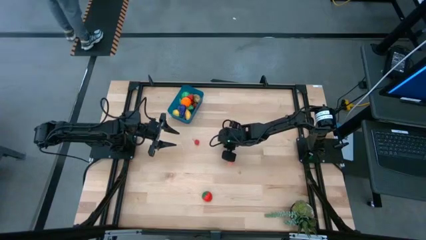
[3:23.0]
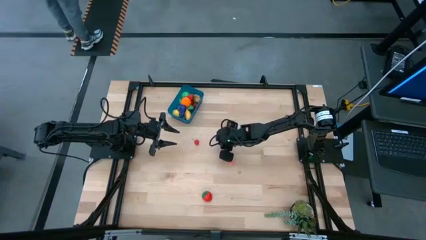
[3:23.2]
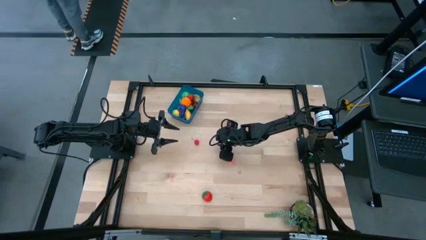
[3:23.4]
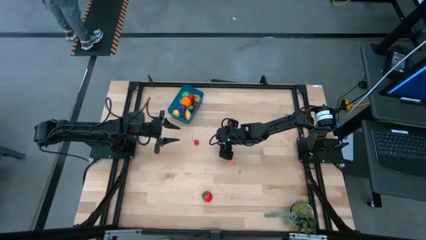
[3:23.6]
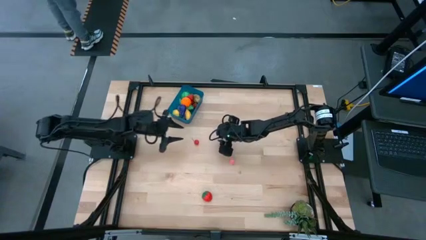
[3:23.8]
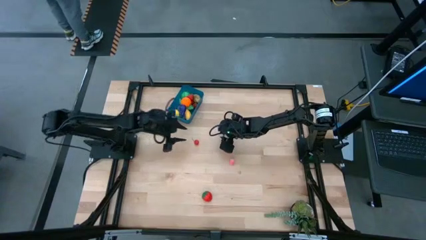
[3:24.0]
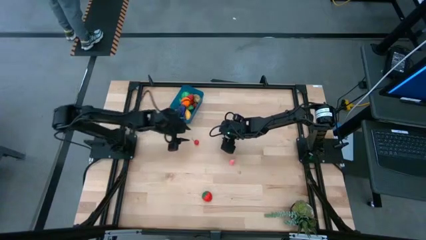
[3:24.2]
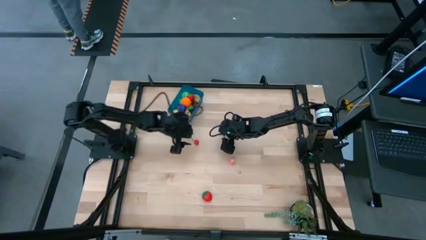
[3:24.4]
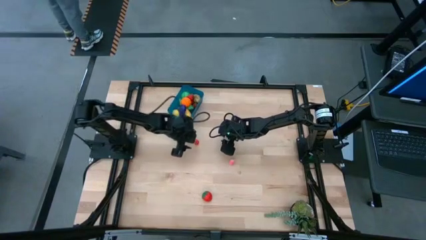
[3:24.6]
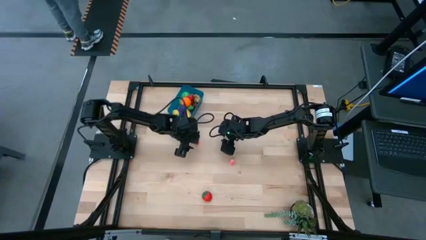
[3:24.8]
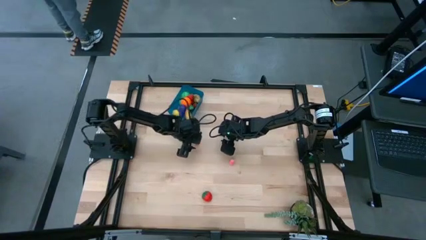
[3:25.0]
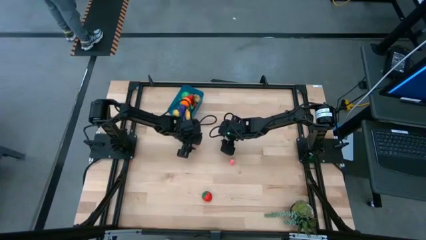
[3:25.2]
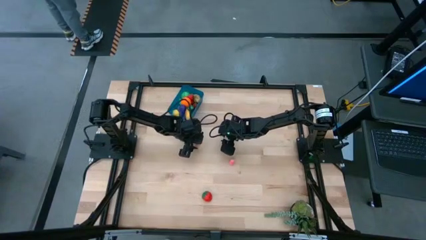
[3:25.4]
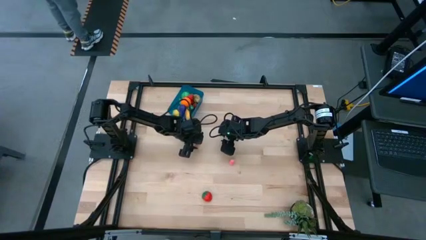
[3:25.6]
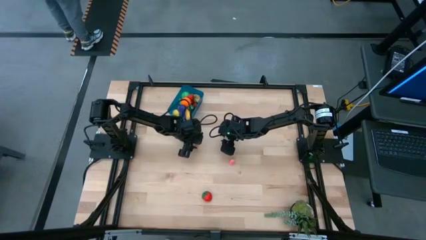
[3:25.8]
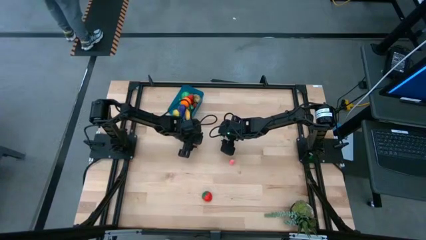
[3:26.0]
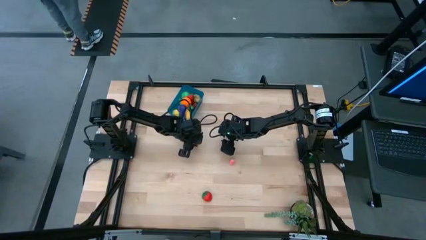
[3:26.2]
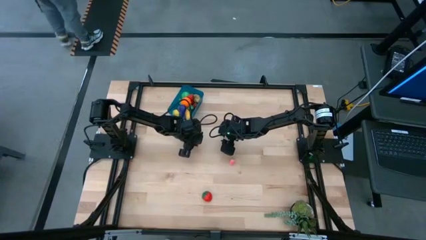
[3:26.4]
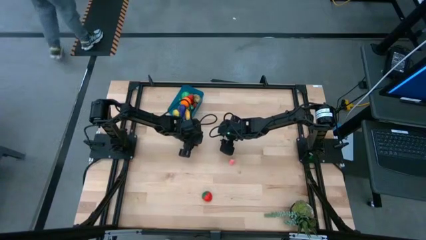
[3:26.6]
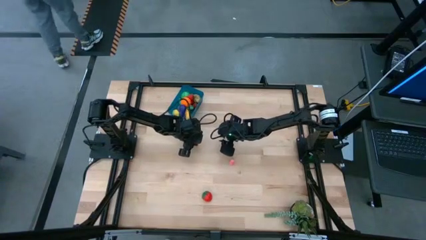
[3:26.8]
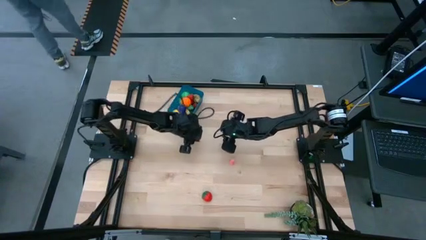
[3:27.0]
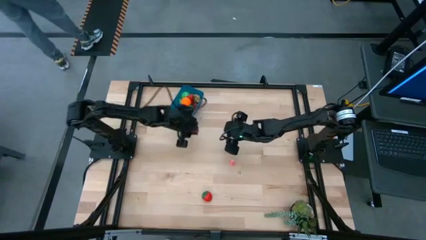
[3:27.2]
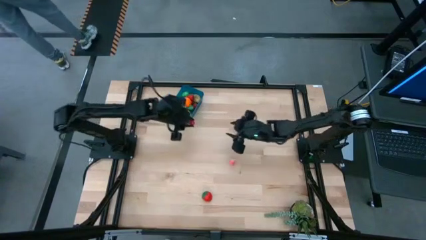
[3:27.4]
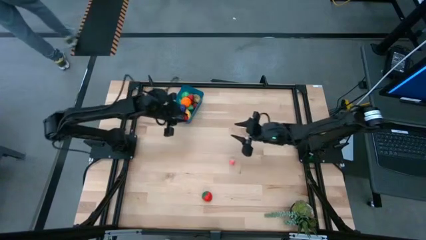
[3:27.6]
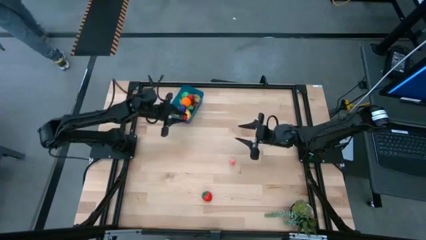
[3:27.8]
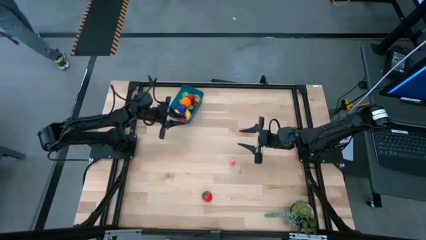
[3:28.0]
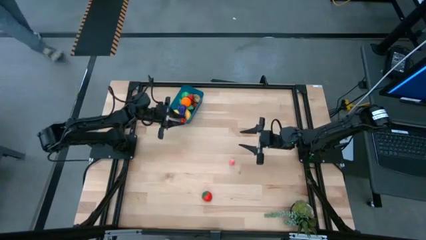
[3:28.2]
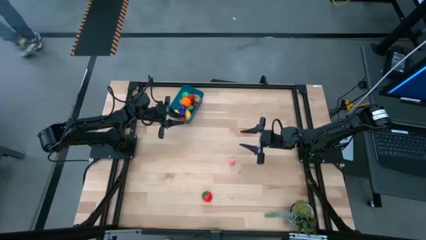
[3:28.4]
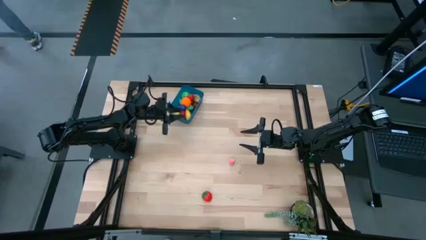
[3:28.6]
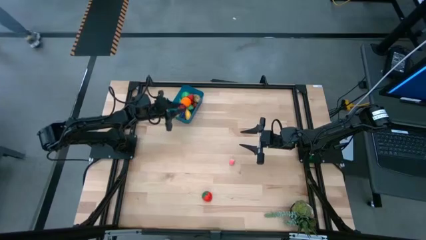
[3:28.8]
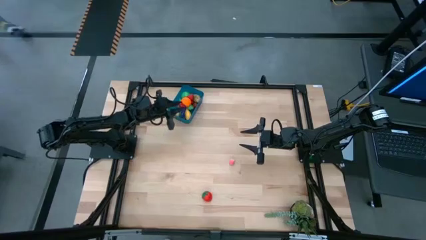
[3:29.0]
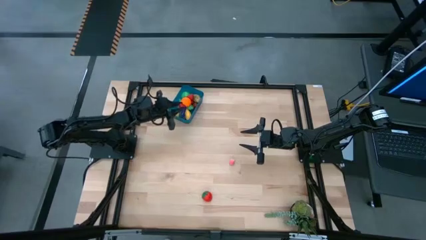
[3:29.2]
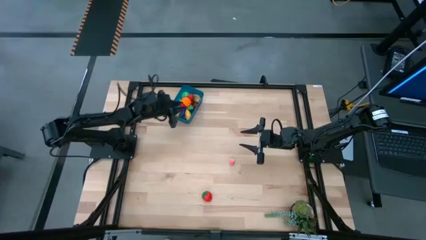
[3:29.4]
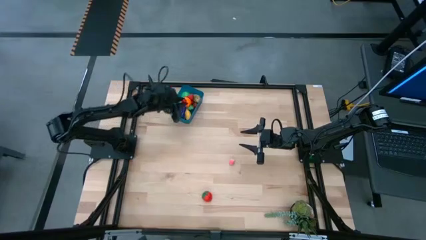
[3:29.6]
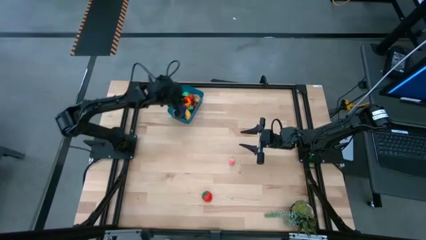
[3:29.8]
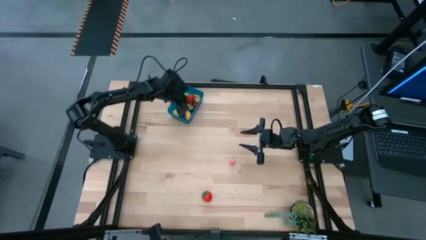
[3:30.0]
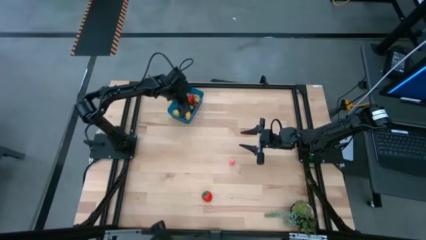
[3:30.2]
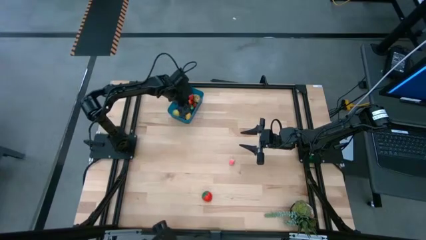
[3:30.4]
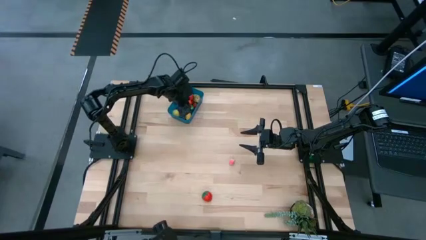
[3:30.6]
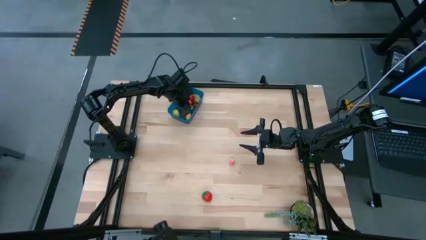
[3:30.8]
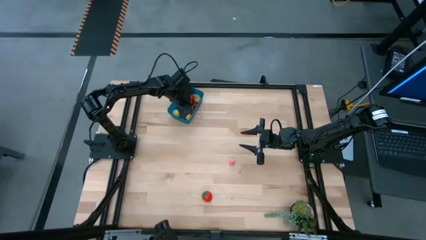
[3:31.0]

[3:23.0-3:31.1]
Task: Pick and placing Produce into tupperware
Put the red cherry into the blue bin

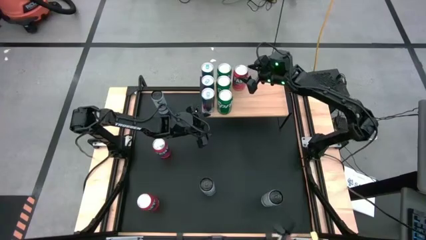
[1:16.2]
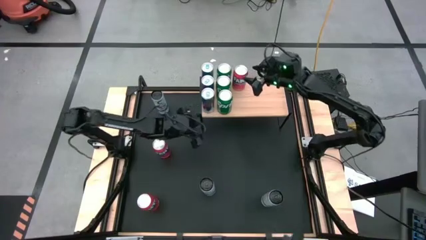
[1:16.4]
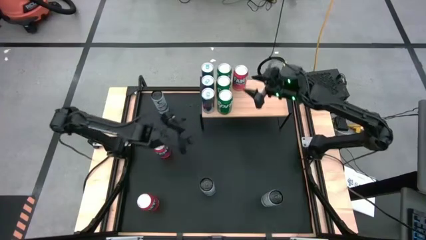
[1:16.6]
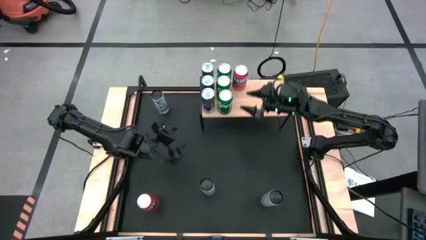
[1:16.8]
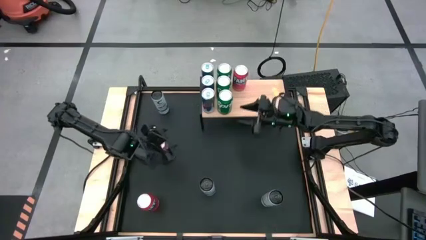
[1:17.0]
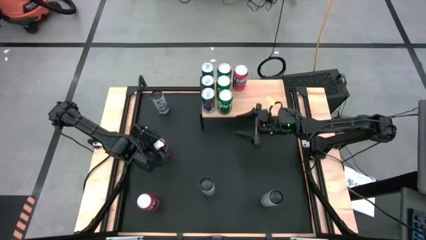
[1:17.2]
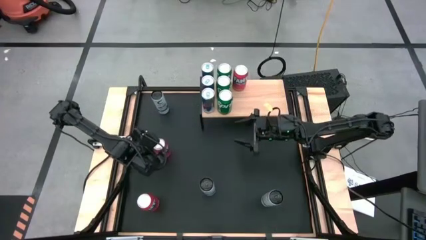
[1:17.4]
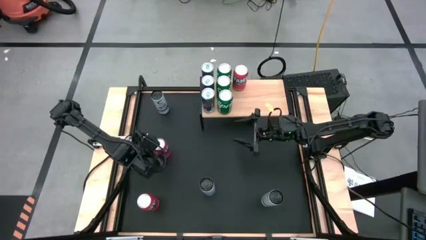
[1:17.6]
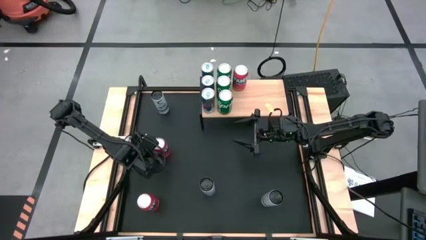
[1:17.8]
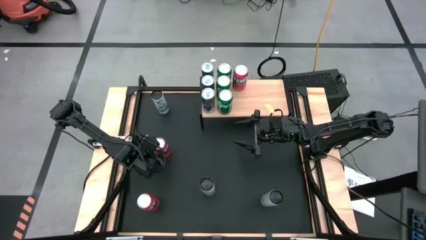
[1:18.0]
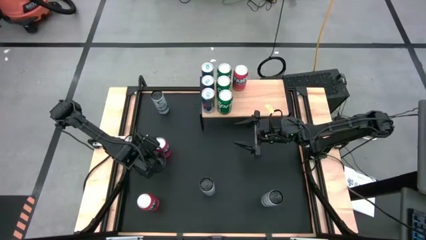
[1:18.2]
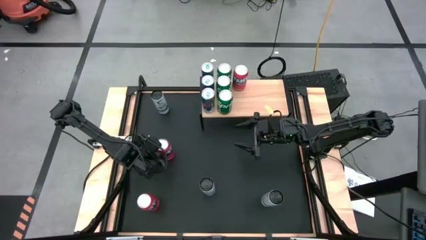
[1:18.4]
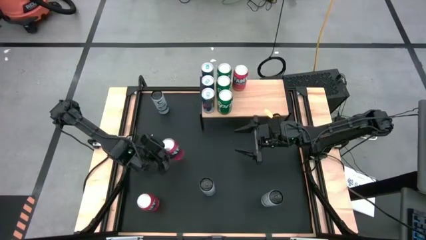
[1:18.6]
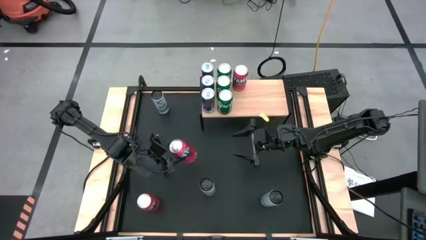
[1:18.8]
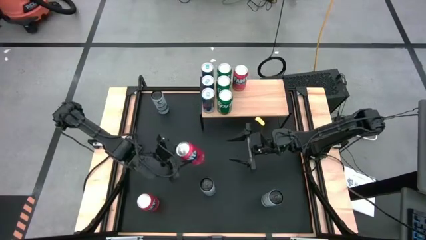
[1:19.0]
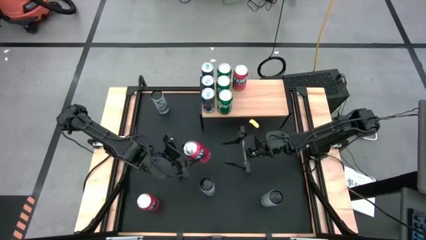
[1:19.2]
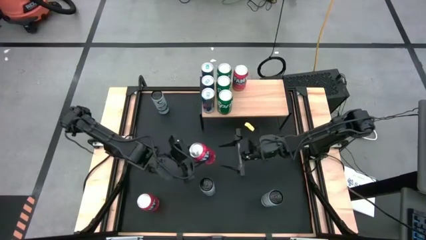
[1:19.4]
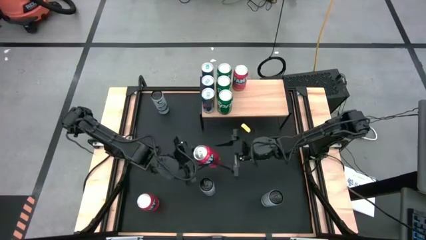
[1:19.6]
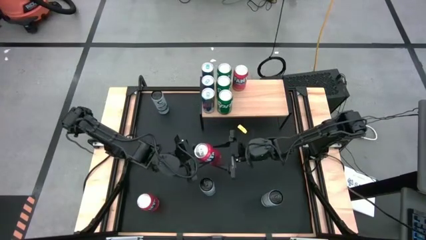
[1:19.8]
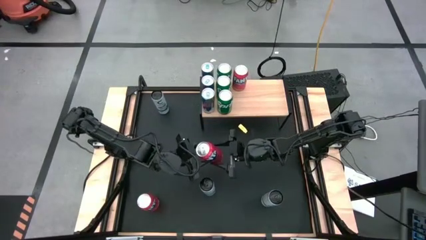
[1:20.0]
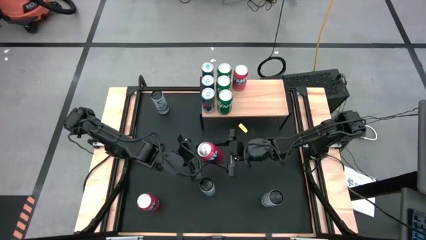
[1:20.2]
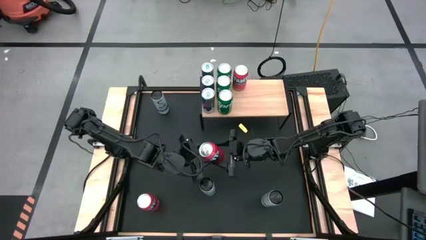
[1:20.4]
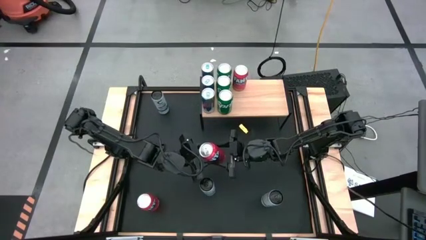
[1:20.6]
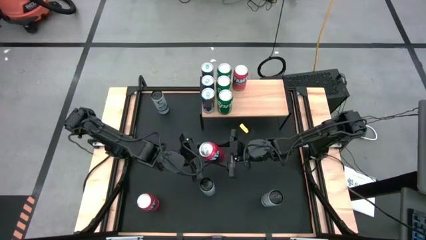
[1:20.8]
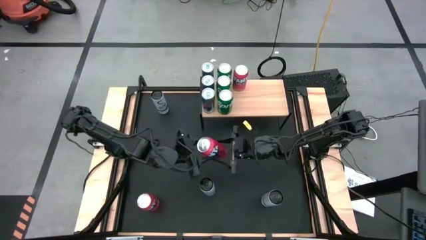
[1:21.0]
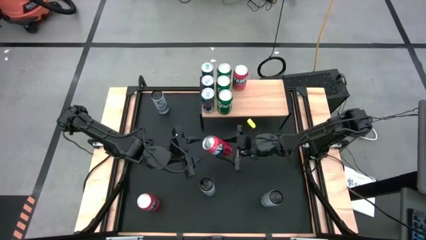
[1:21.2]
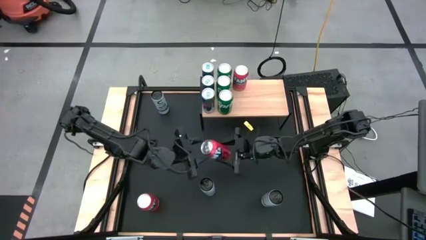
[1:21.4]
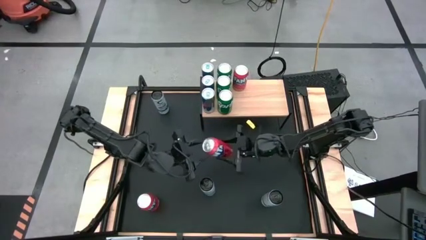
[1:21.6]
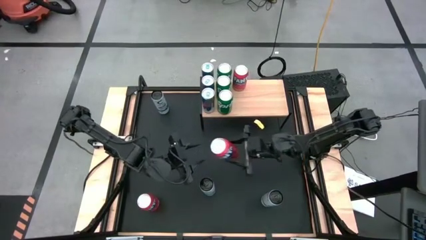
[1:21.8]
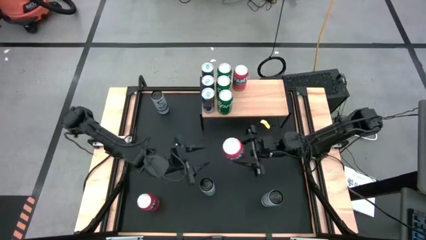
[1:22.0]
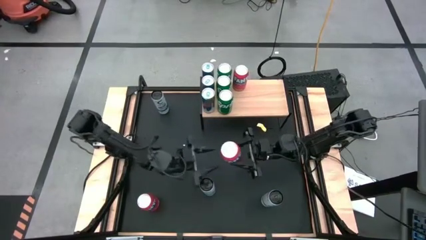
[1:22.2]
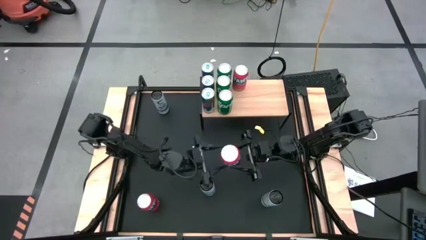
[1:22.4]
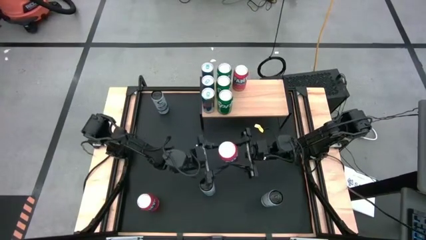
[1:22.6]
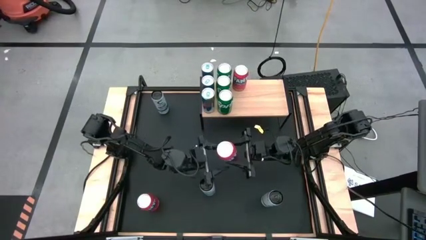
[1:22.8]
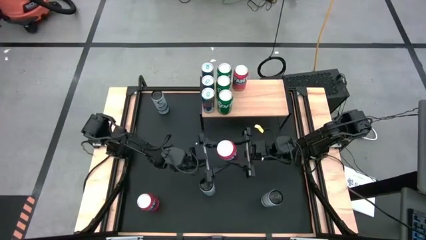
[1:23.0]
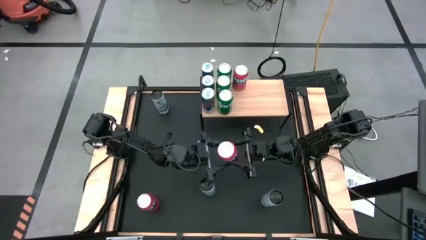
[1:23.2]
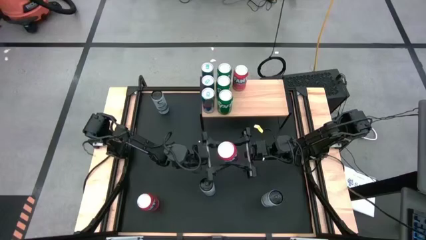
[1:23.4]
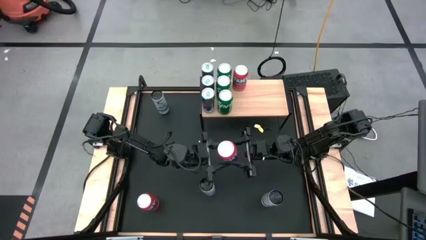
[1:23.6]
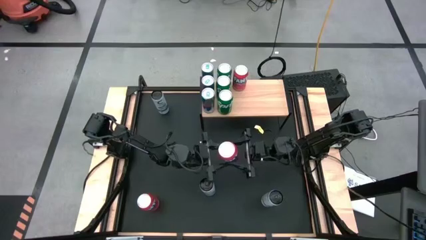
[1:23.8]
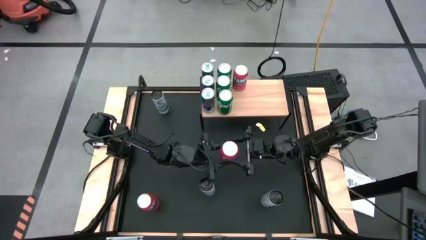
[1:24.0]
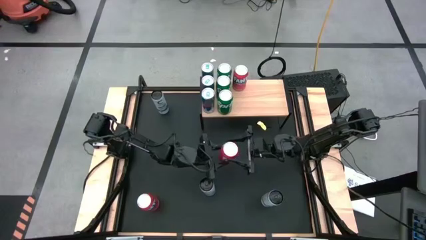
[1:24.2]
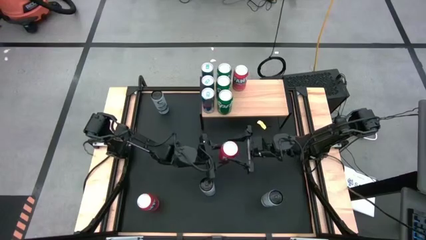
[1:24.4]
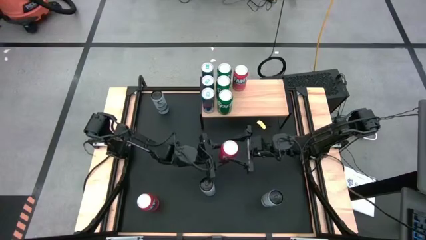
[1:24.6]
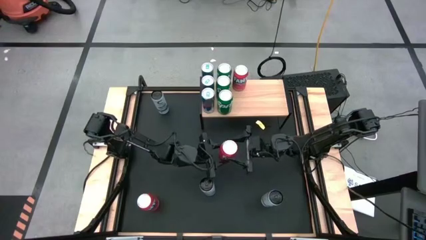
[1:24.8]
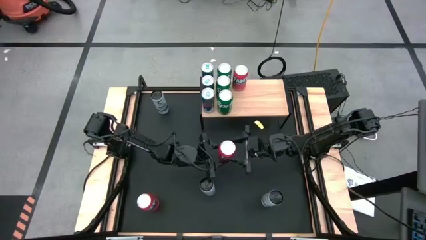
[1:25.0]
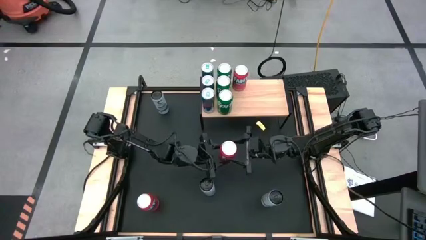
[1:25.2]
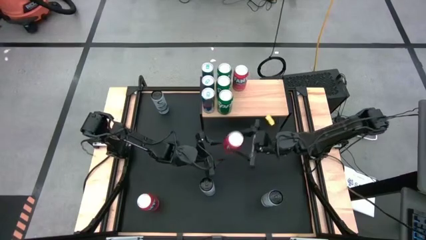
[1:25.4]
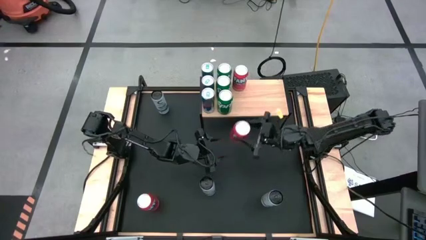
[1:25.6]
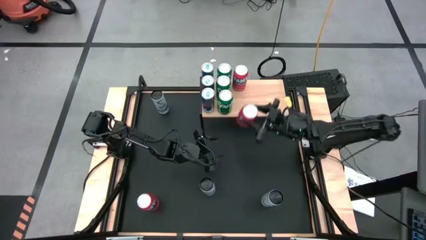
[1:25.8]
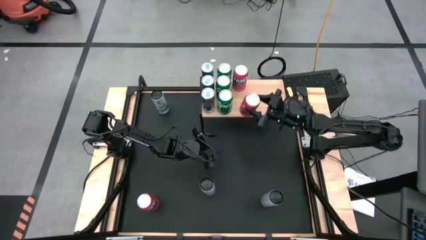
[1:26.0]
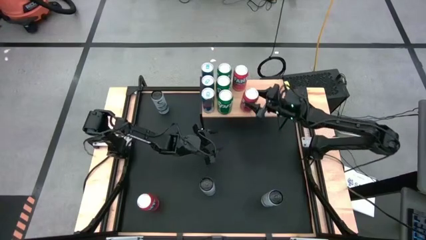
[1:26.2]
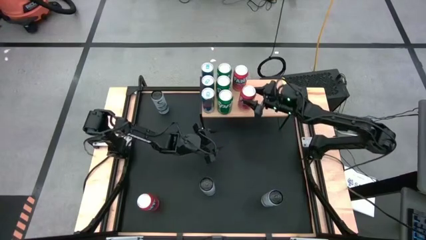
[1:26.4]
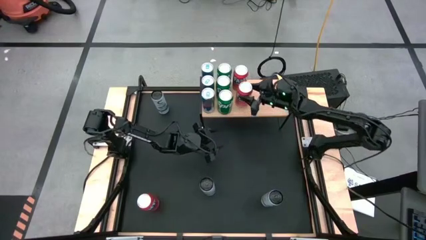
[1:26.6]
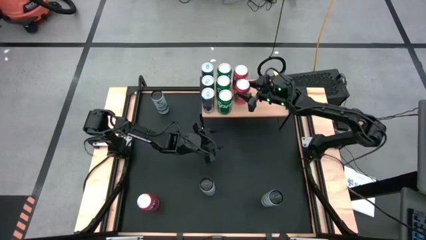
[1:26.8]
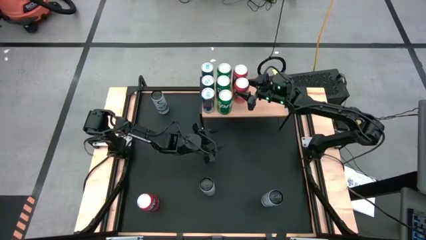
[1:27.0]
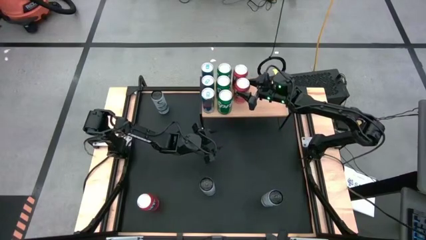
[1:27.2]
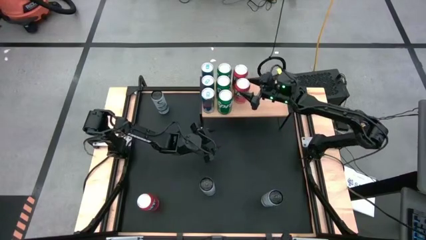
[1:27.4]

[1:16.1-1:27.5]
Task: Place canned beverage on shelf
Put the top red soda can on the shelf aligned with the other red soda can
